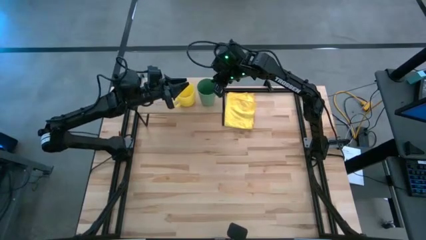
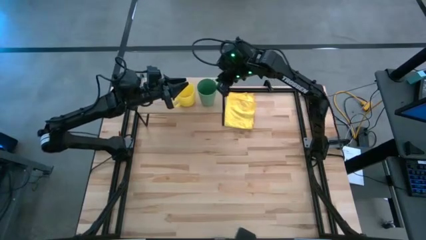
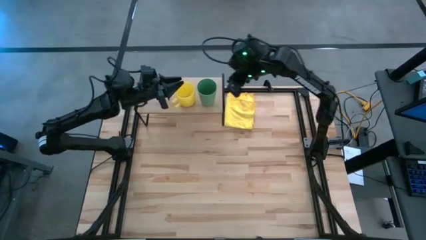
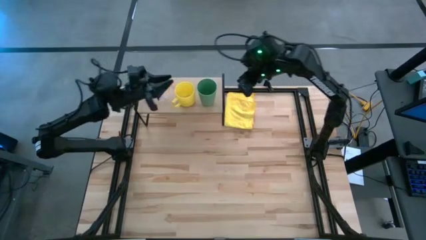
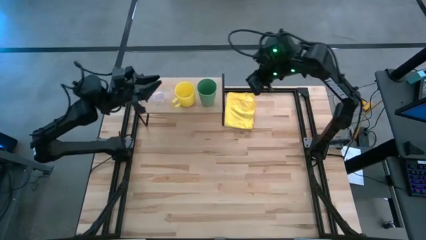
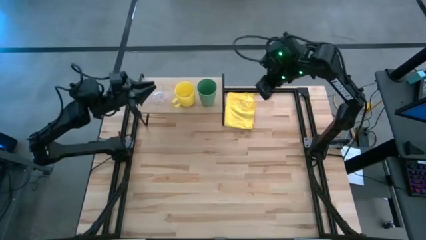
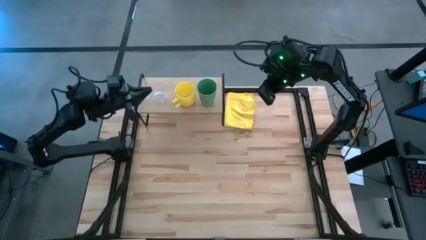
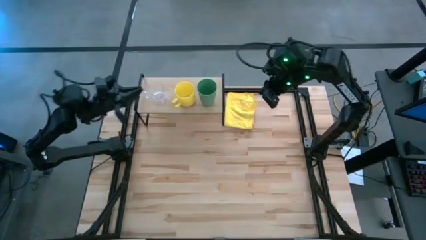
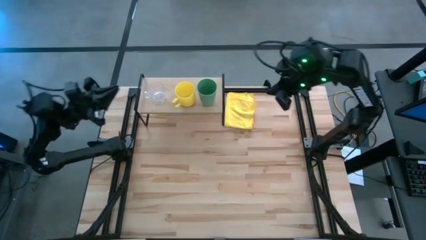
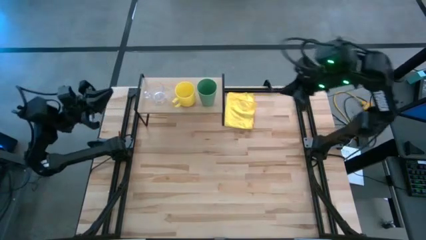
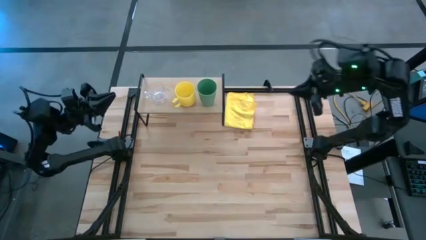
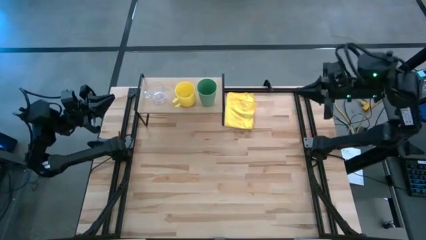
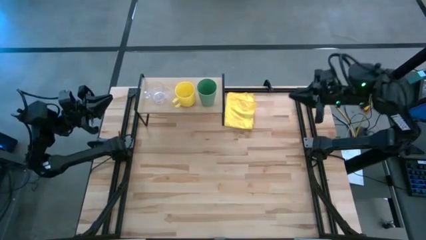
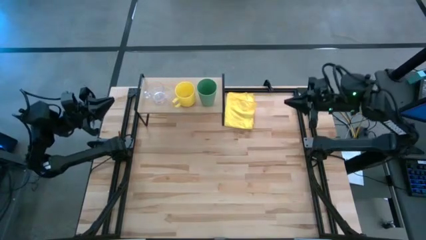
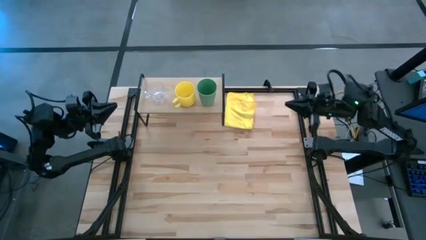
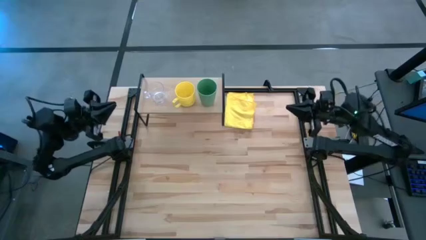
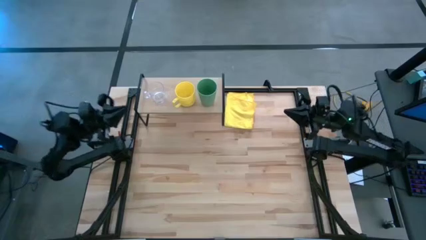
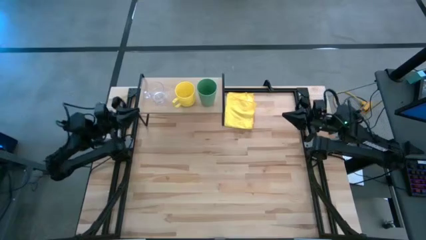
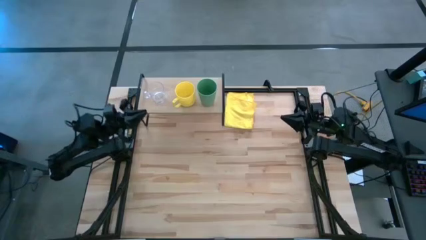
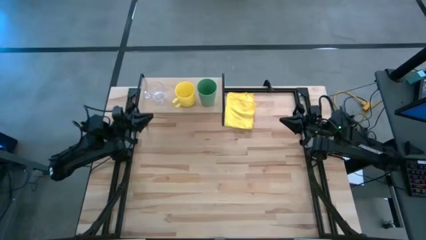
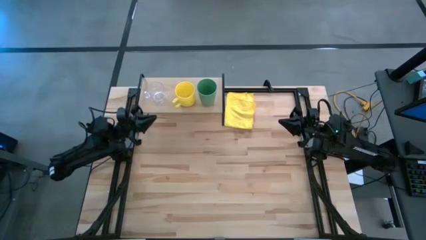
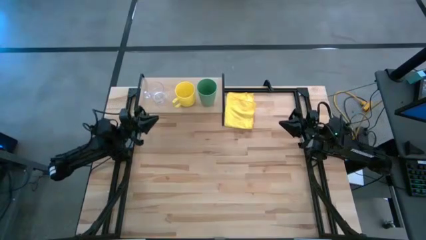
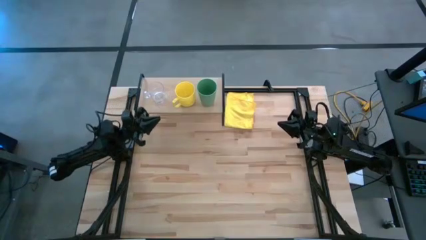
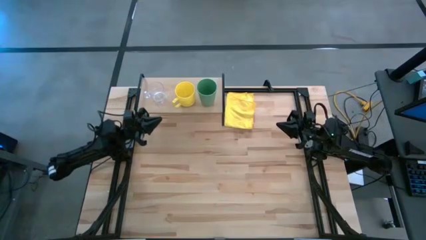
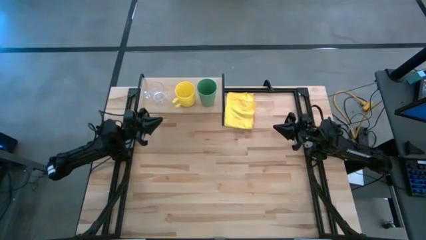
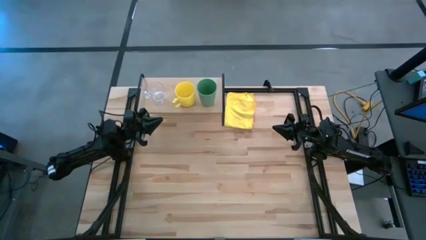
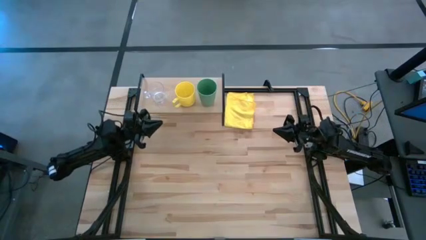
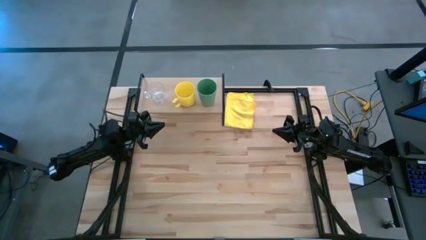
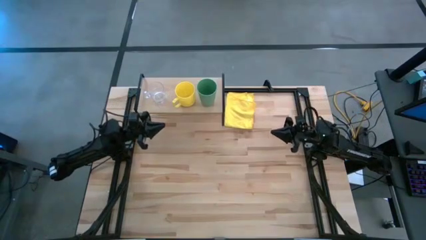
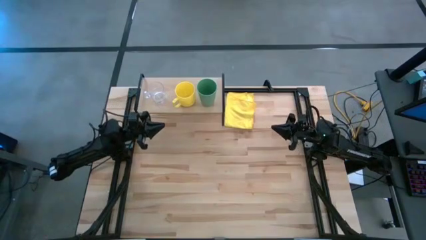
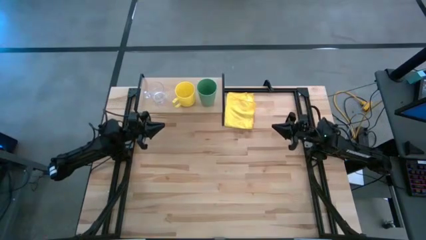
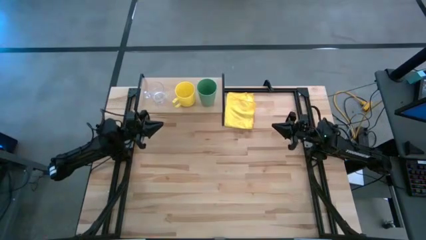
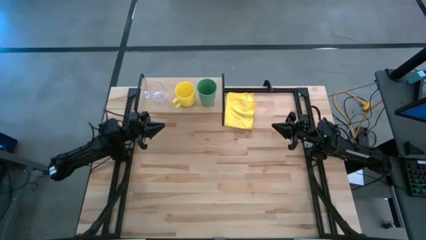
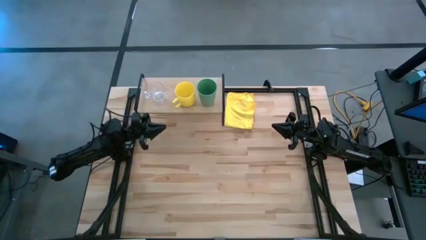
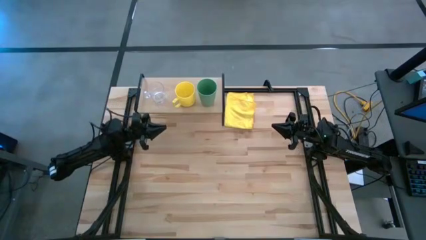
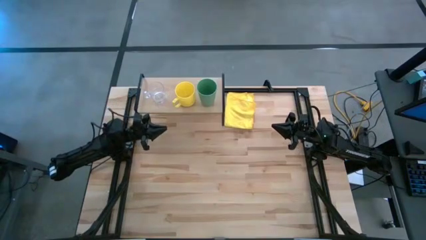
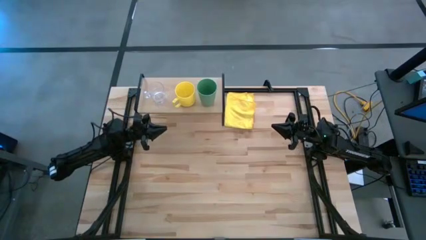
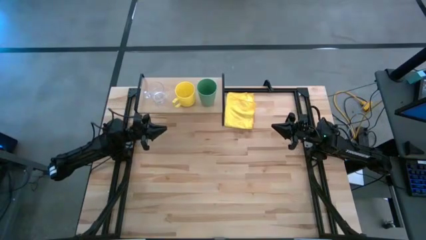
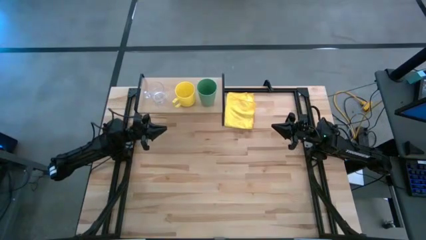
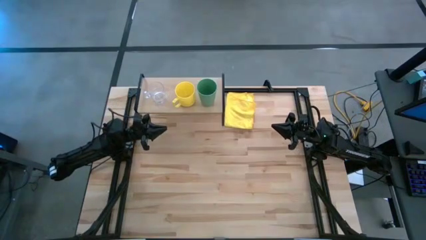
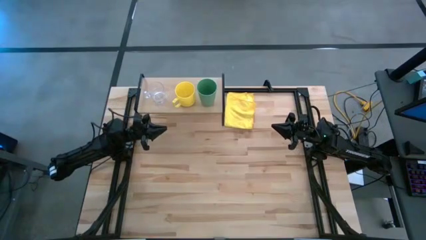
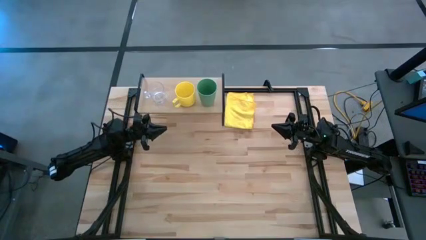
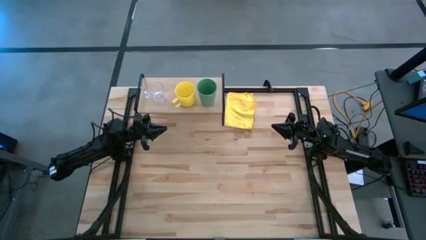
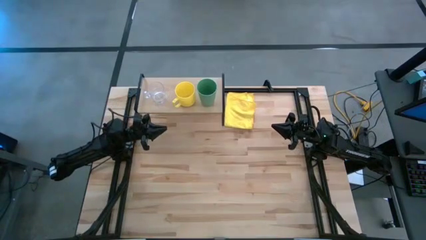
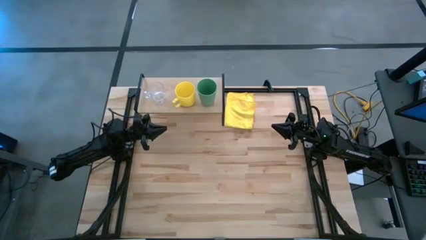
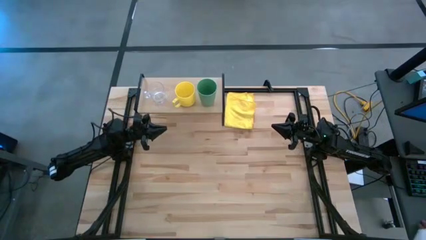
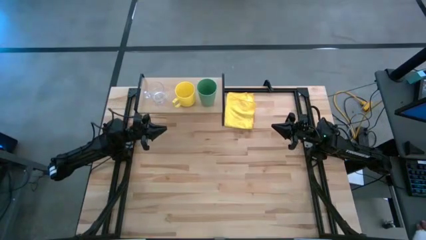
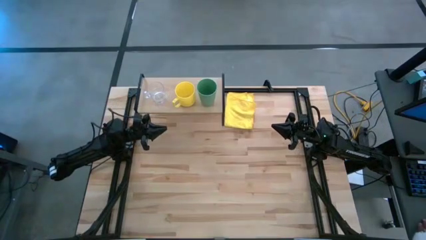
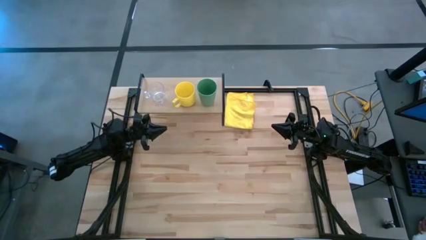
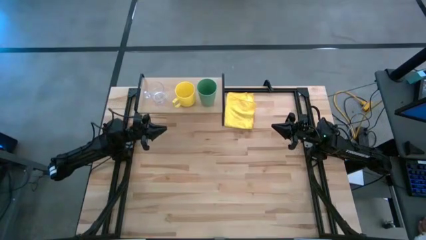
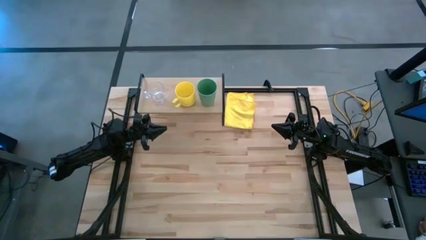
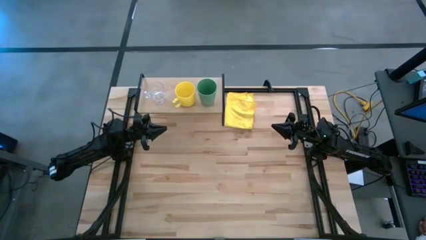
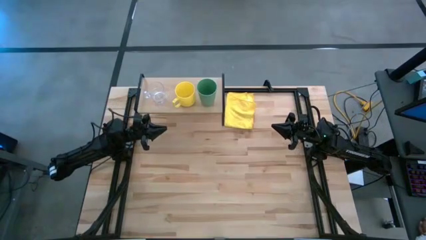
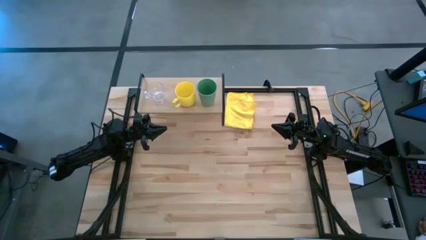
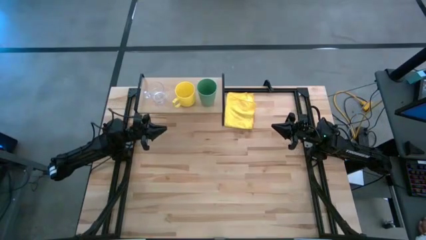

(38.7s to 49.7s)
Task: Stack small to large cups/mugs on shelf
Return to Home Position
